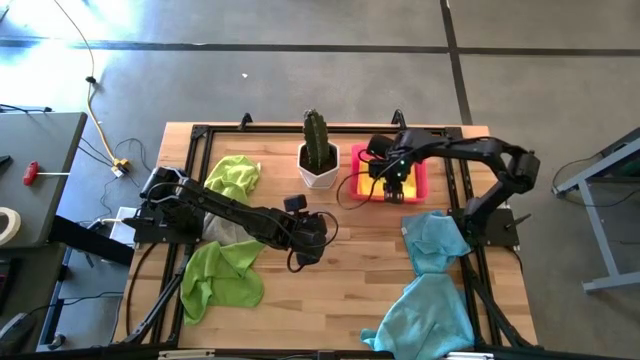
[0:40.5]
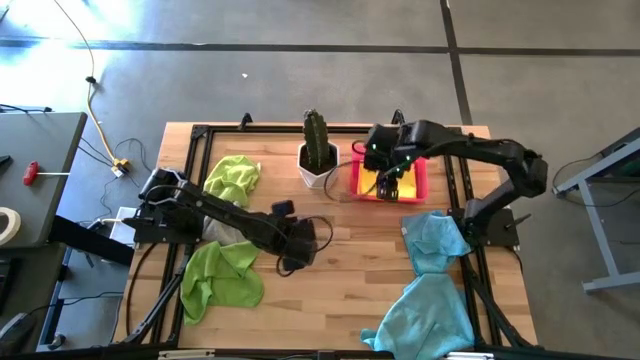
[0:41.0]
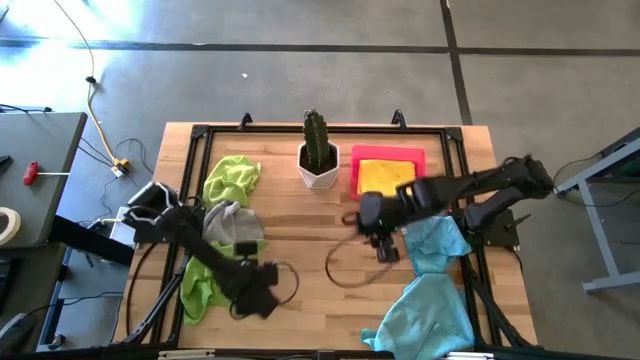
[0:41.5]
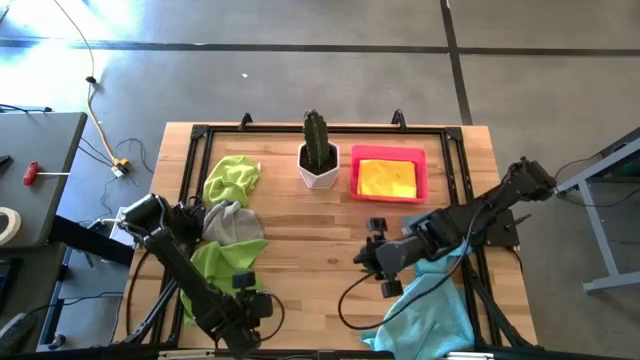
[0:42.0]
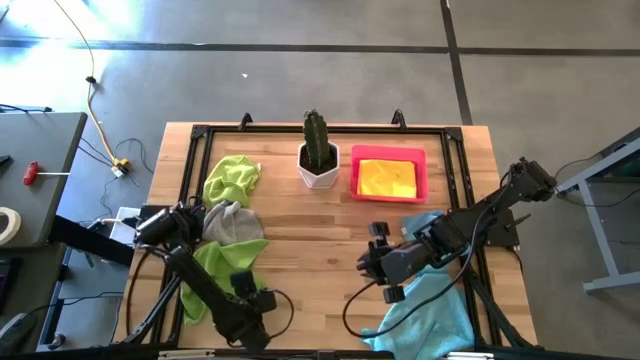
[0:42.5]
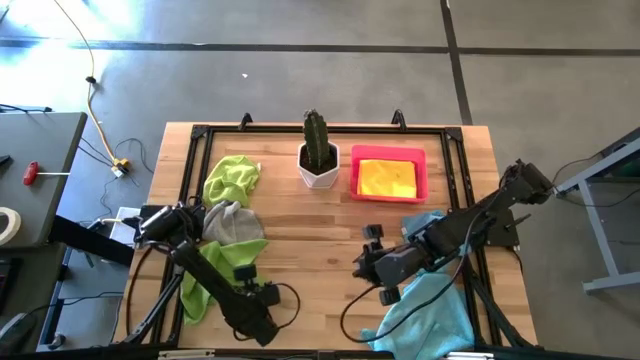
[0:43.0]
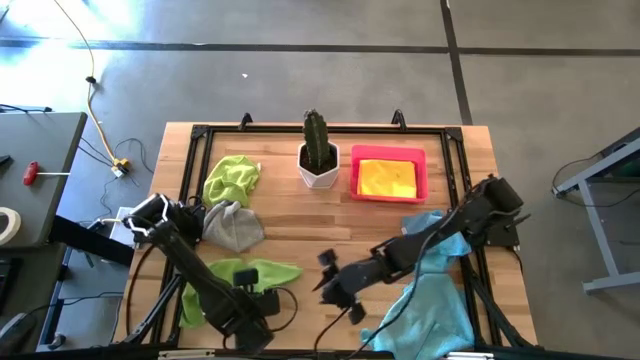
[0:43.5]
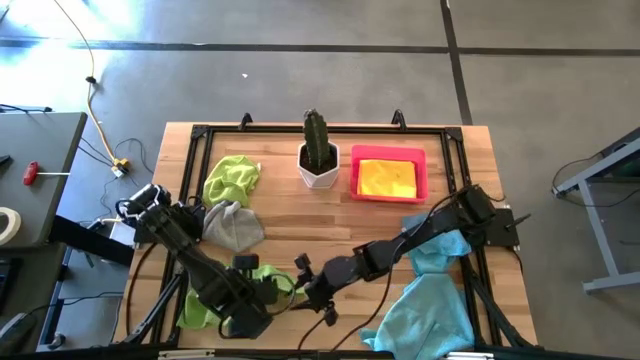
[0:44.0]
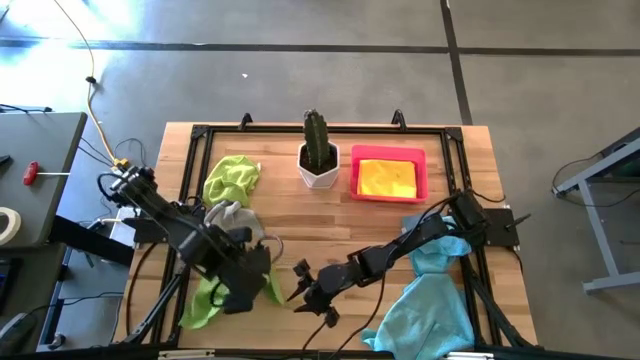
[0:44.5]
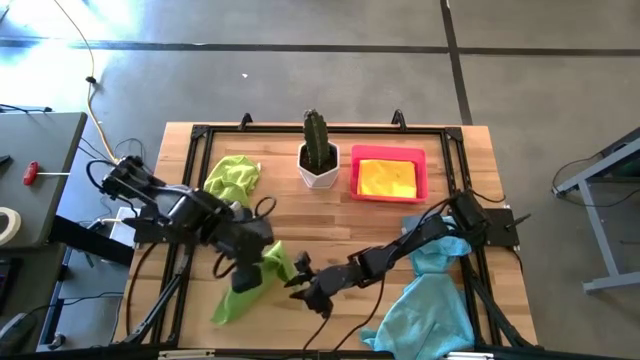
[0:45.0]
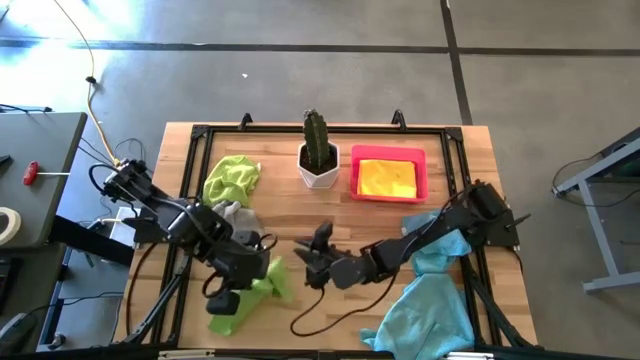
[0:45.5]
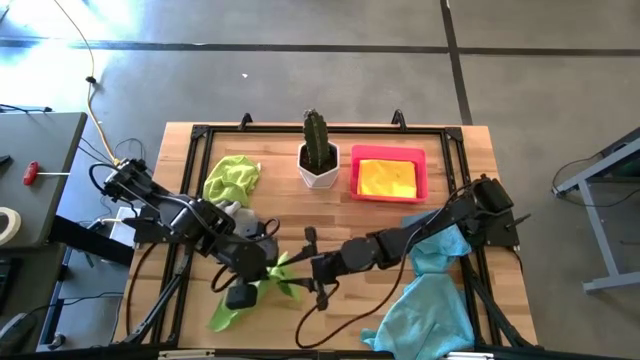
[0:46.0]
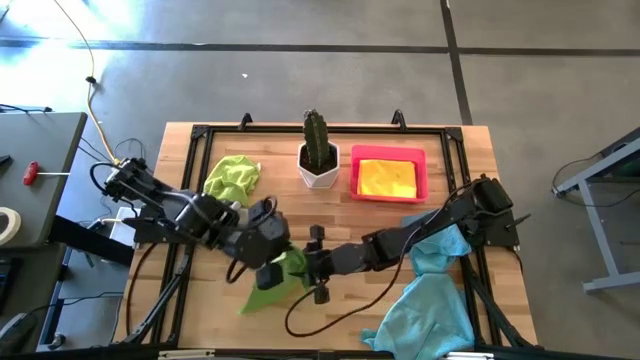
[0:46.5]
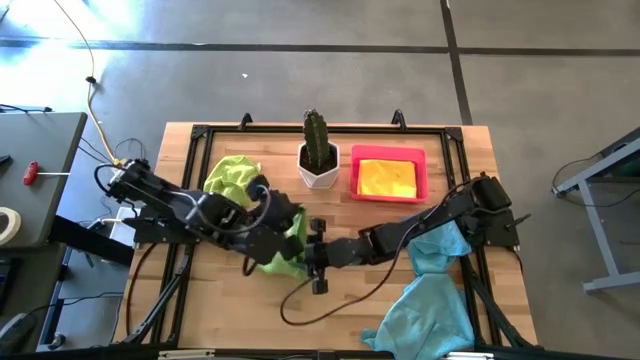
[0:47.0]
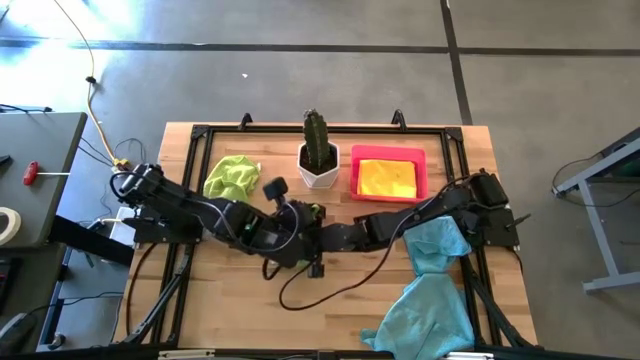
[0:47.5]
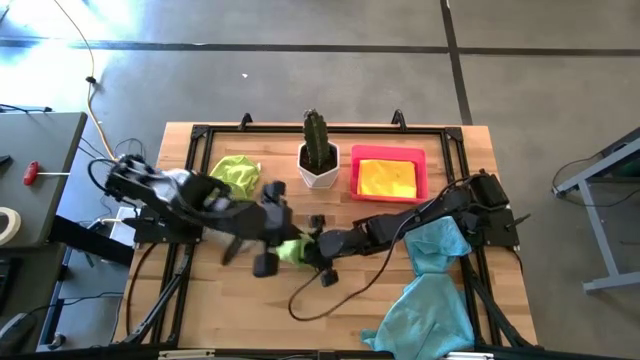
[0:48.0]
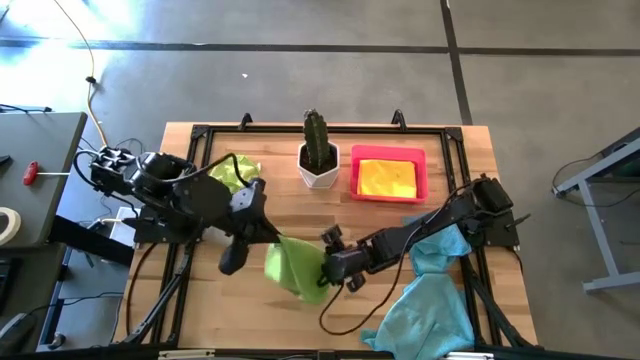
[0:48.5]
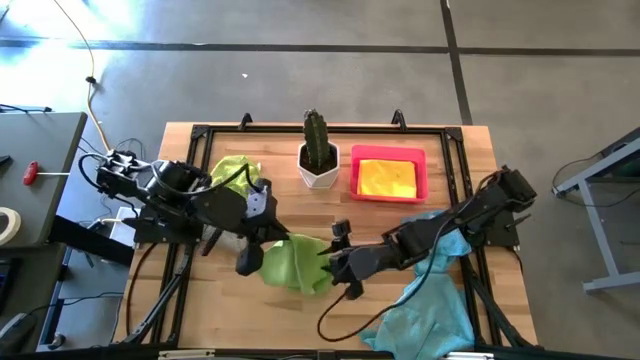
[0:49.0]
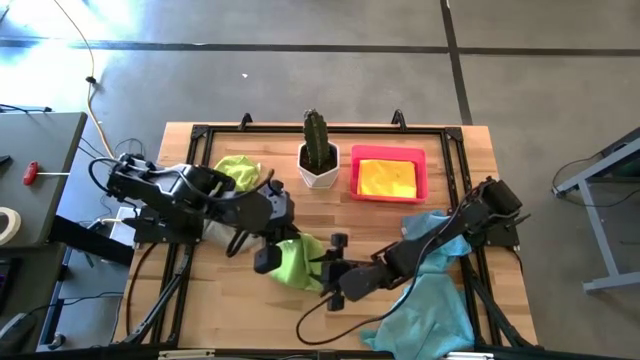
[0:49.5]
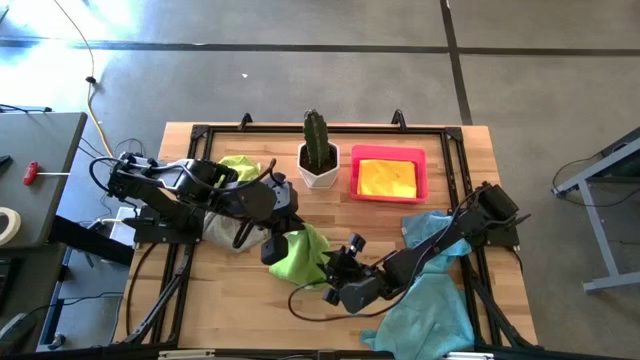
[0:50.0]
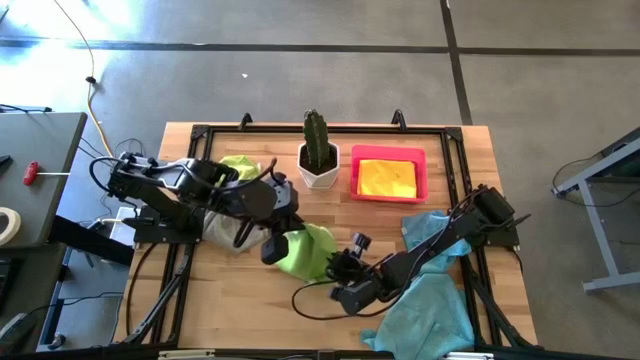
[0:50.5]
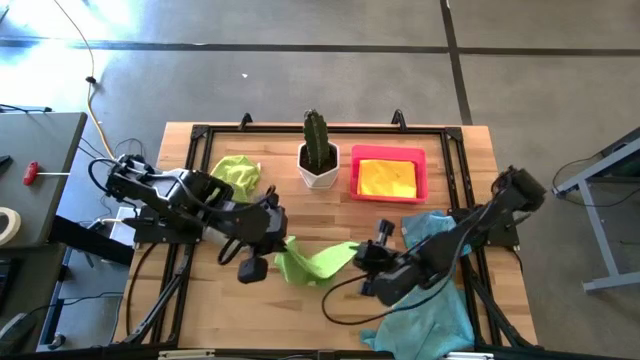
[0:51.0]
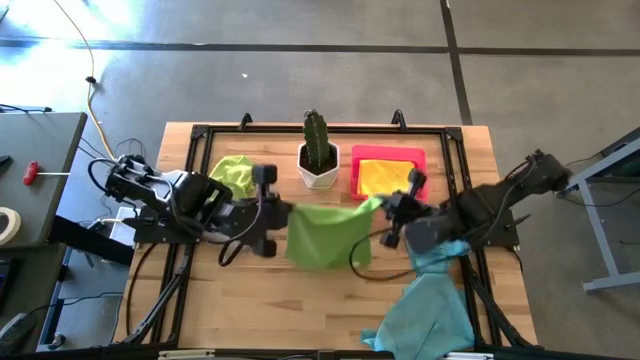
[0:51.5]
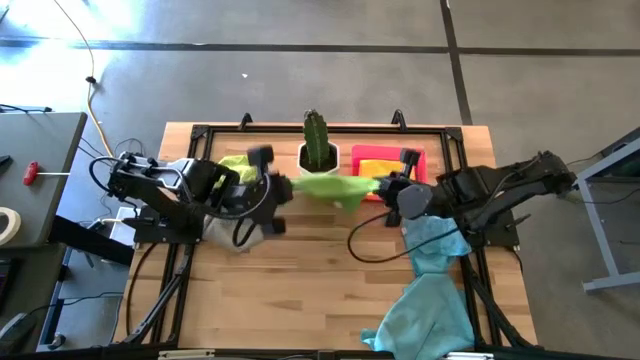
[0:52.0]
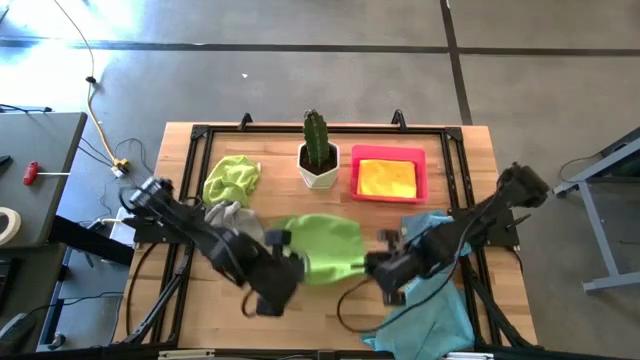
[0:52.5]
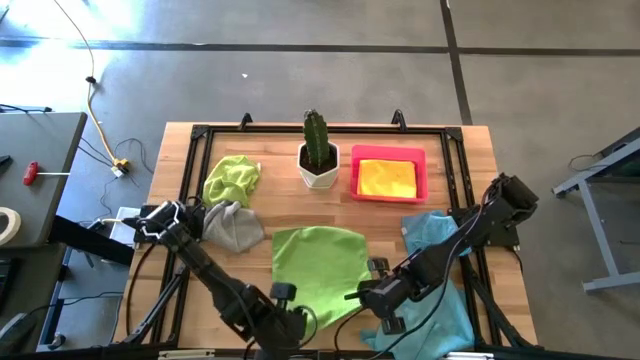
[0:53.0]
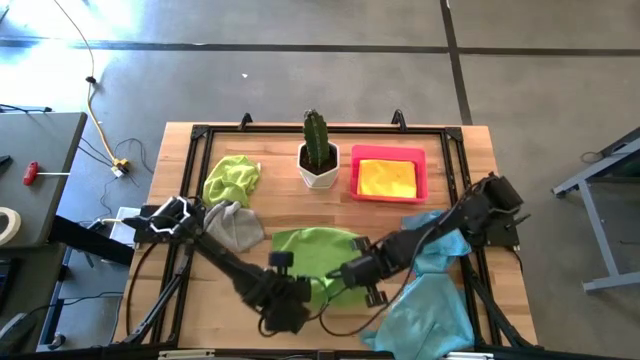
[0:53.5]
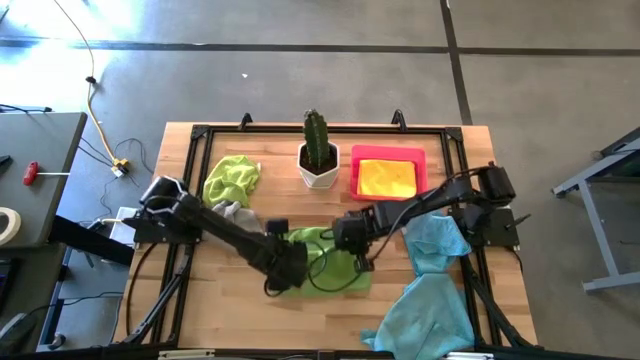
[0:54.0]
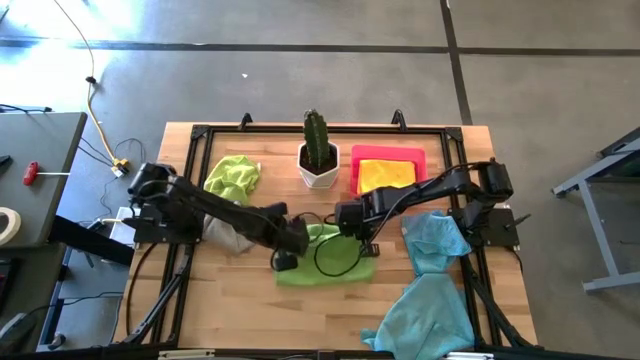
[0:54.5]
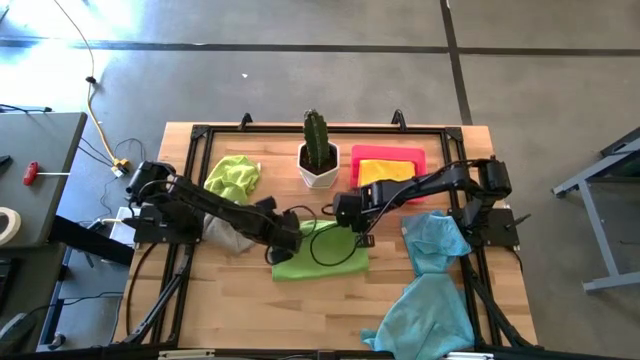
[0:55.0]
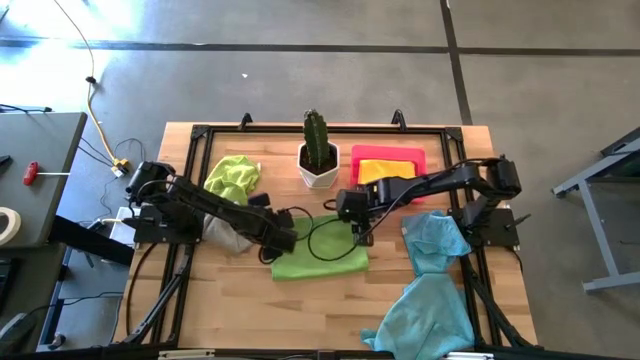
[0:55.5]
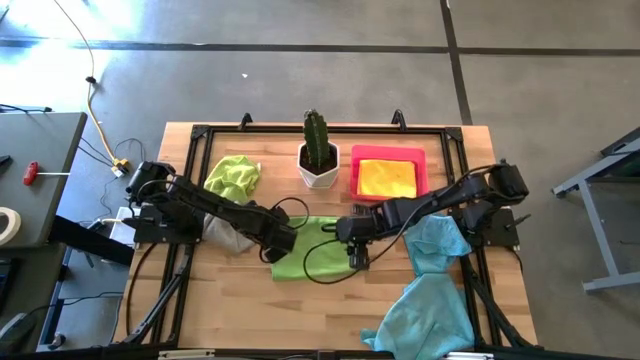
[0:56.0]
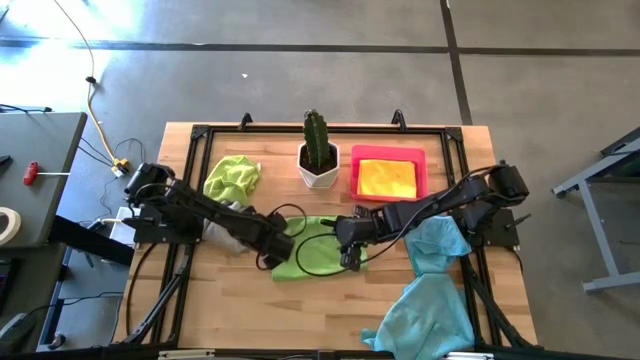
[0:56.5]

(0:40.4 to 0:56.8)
Task: Fold microfiber towels
Fold the bottom green microfiber towel

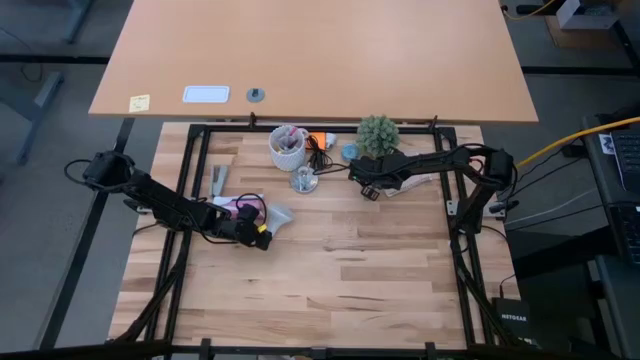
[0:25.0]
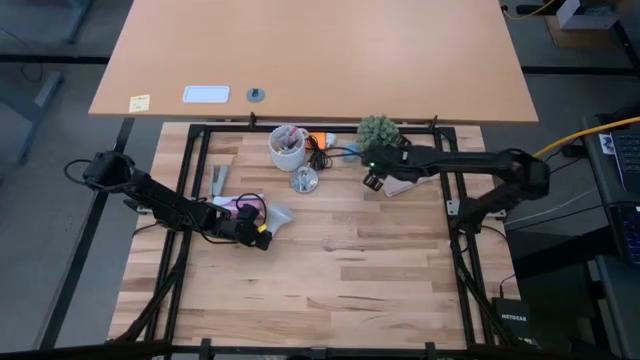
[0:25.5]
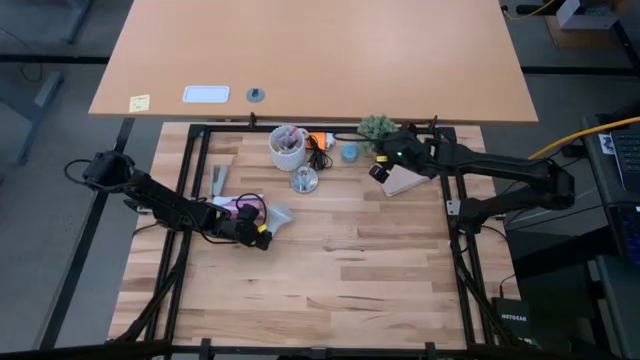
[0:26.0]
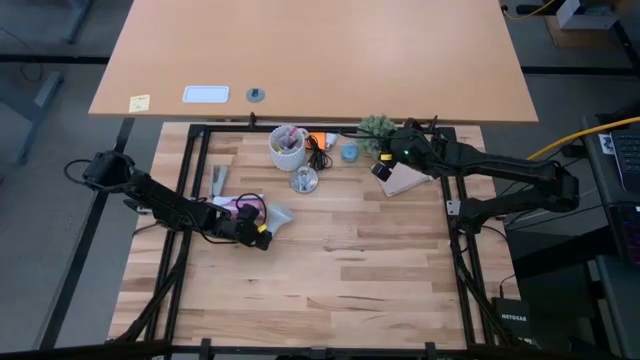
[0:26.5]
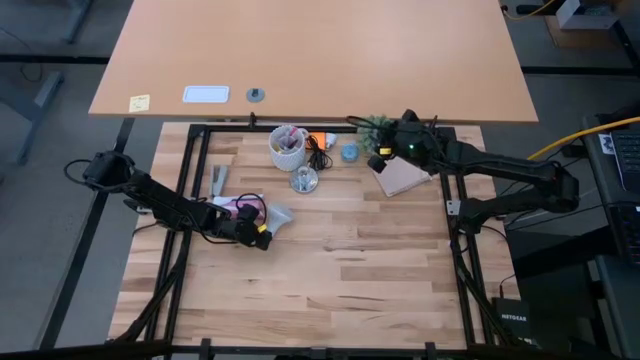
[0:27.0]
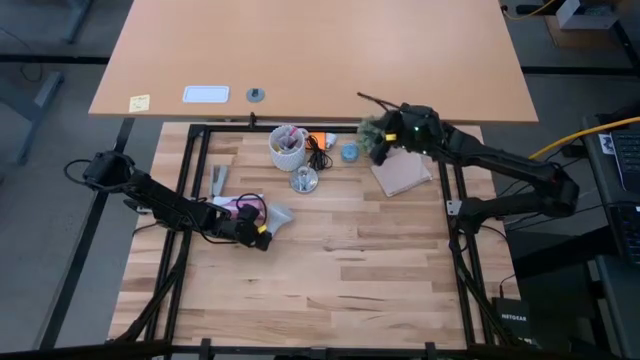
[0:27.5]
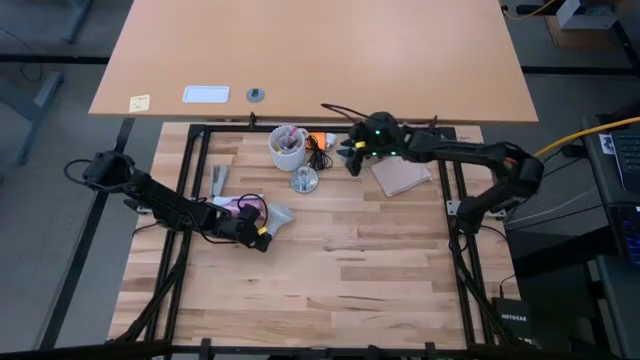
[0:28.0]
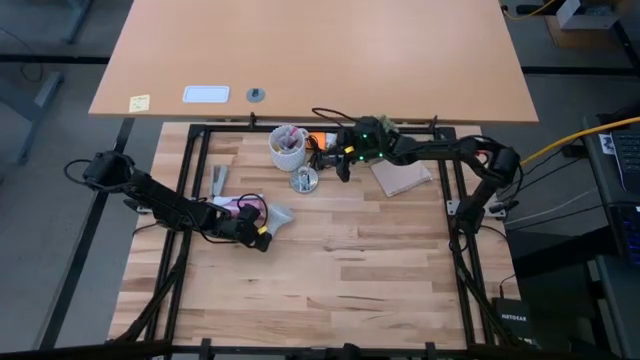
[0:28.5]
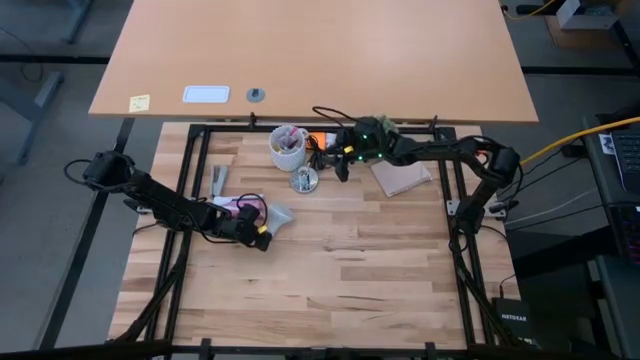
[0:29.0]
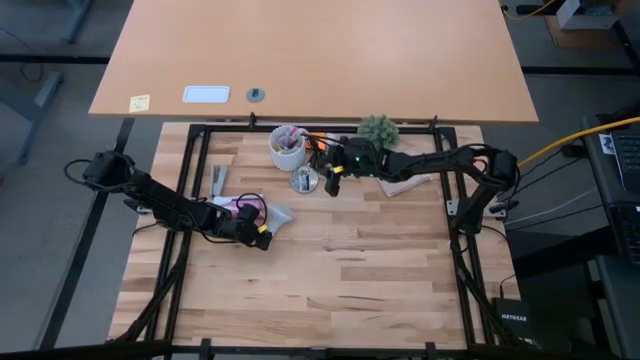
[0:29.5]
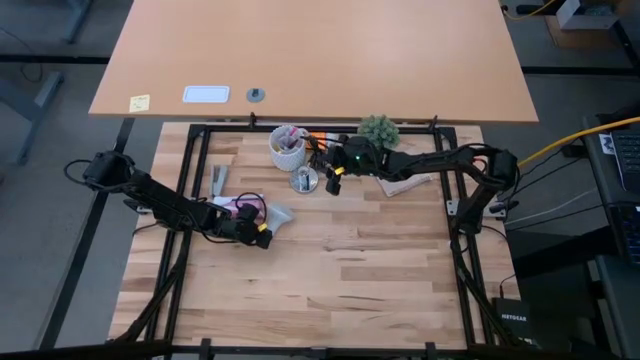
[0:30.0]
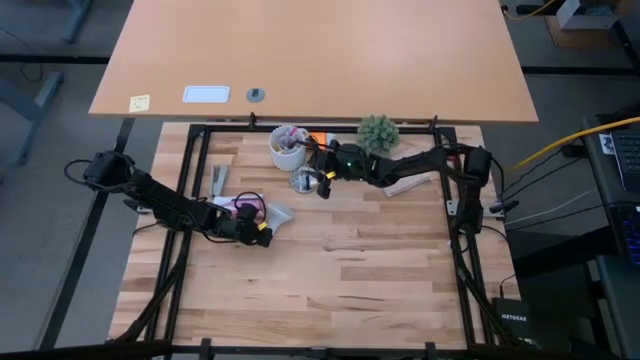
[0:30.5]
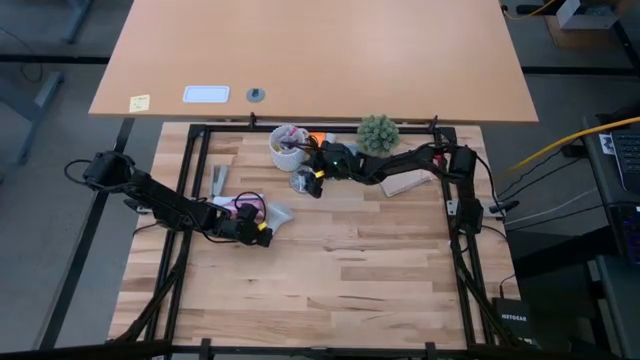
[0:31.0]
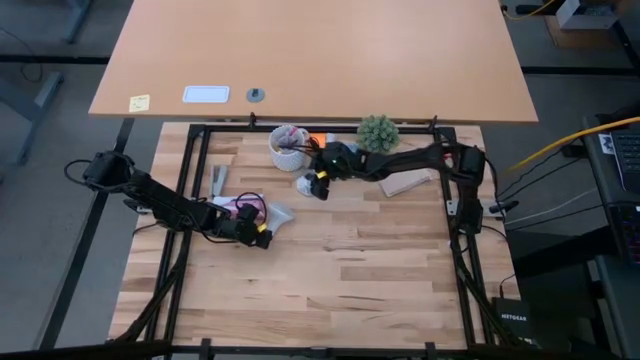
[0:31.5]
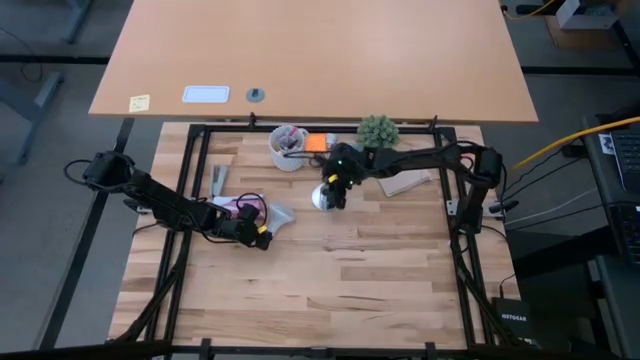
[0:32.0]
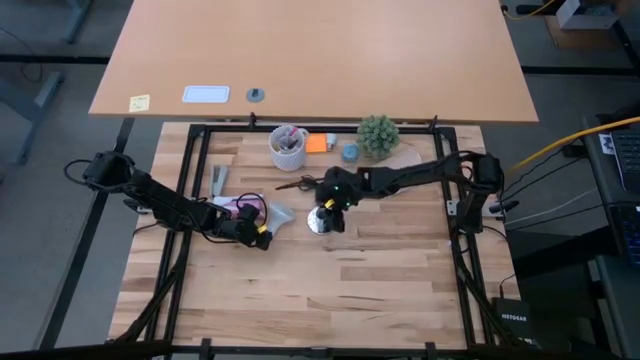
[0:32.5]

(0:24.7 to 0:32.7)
Task: Screw lightbulb
Move the silver lamp to the center
